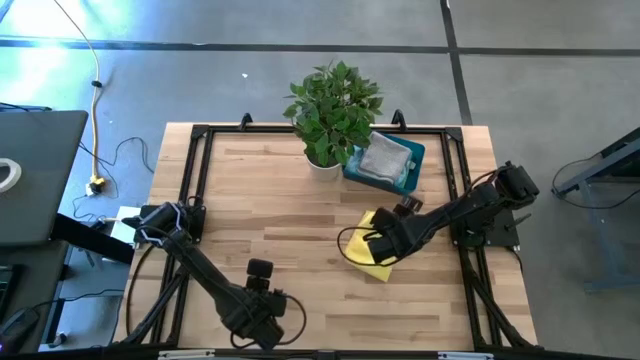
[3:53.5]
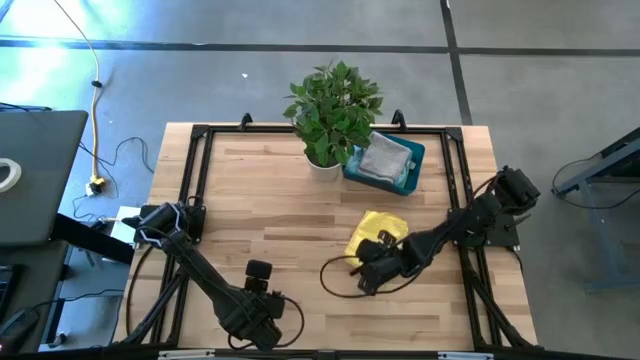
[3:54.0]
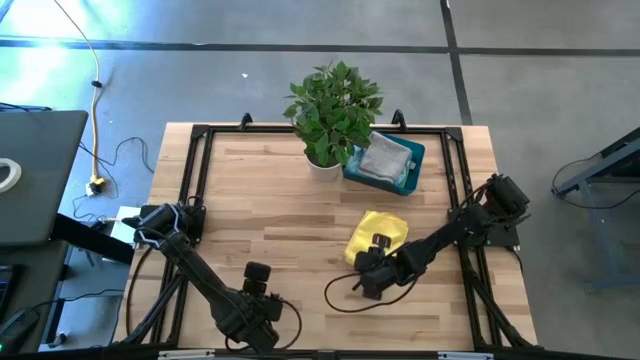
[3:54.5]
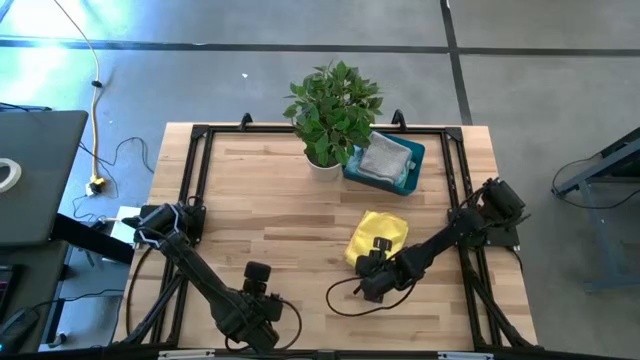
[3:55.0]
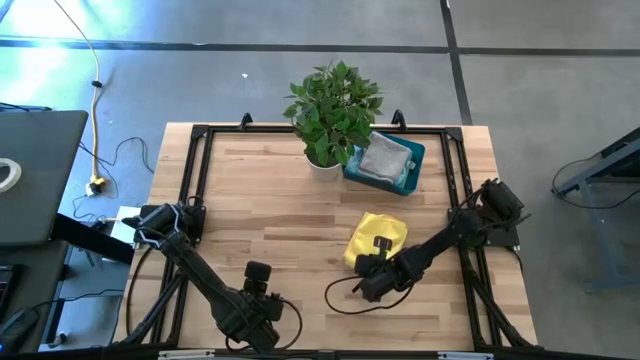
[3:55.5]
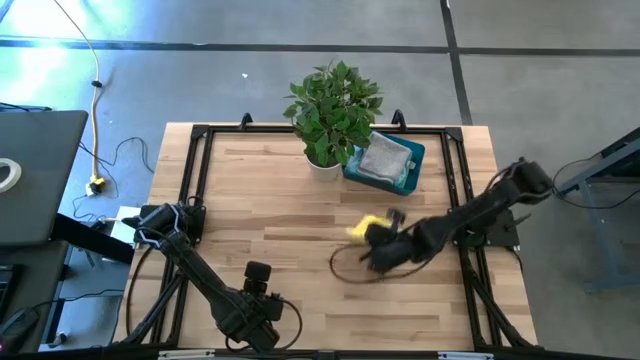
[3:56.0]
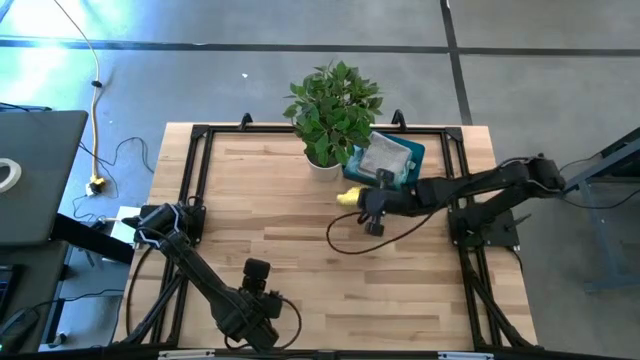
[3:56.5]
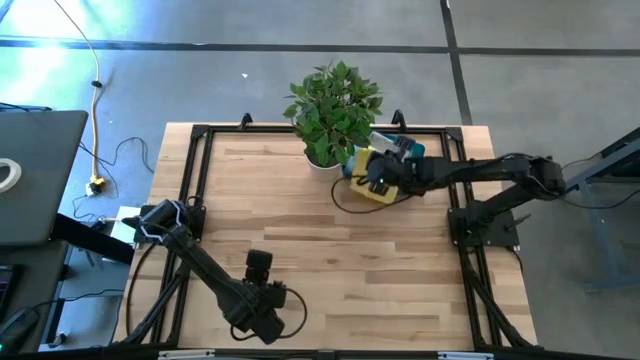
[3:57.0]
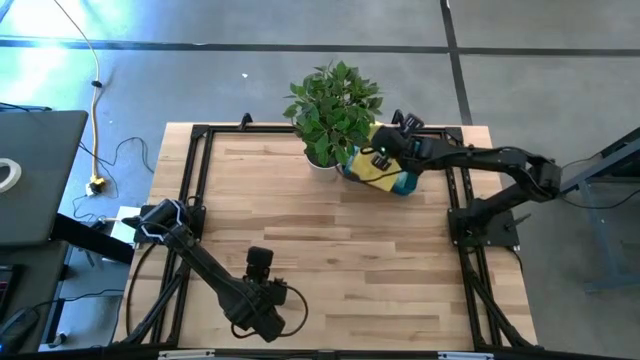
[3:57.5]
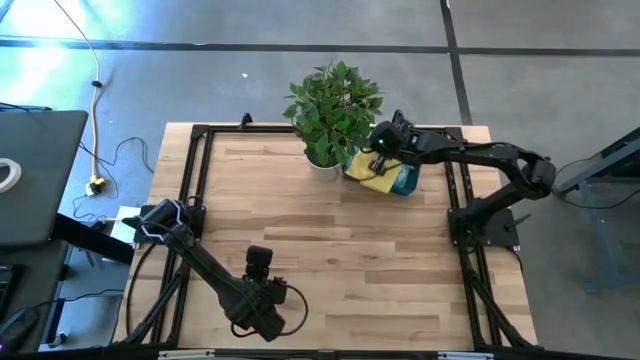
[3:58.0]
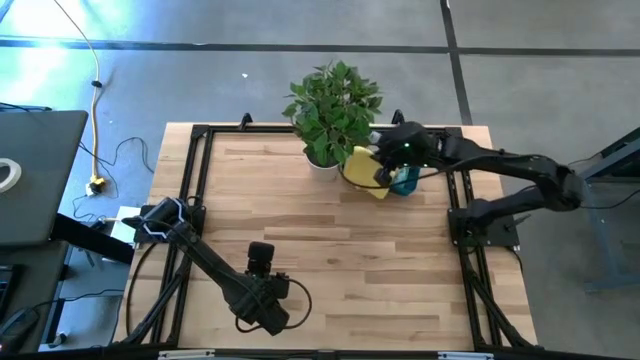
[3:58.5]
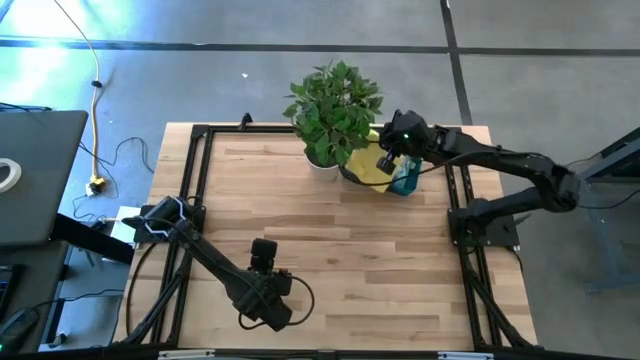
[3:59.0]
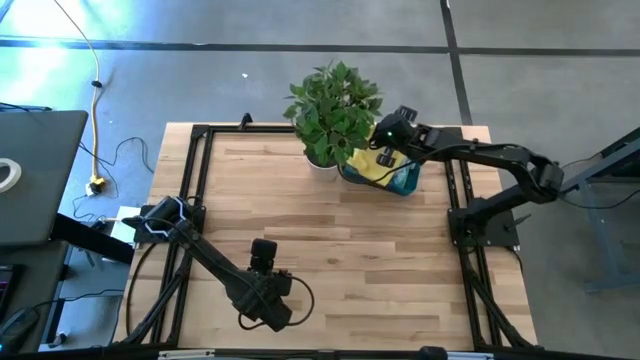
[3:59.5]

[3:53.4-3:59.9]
Task: Fold microfiber towels
Put the yellow towel into the blue bin

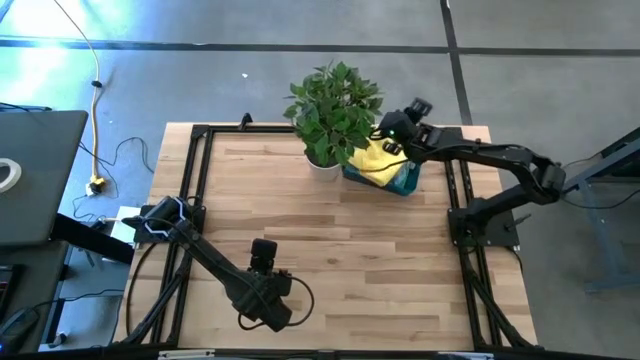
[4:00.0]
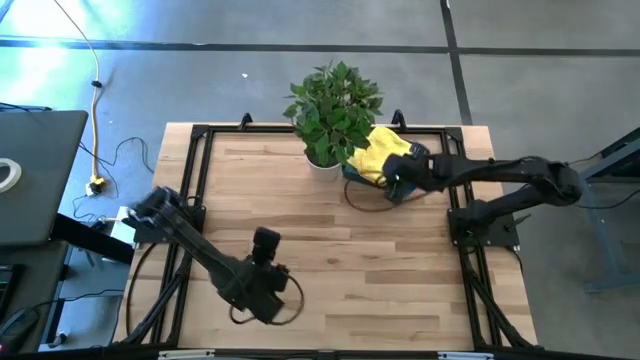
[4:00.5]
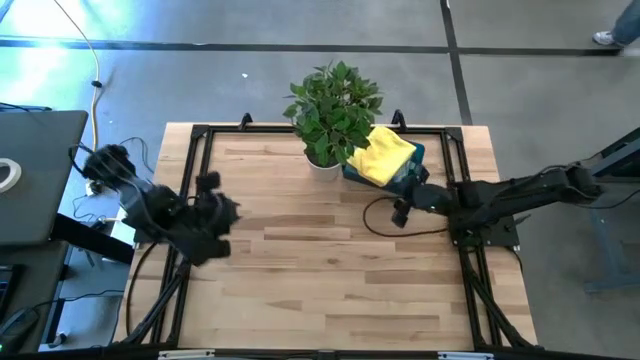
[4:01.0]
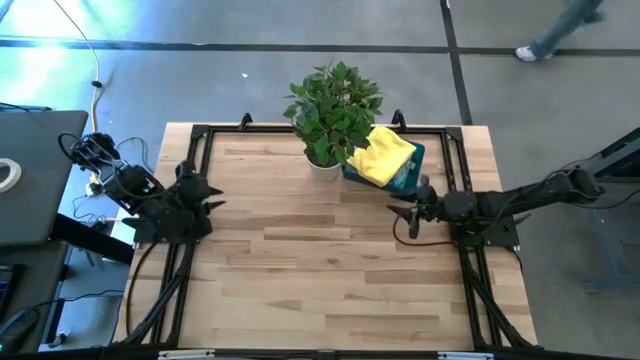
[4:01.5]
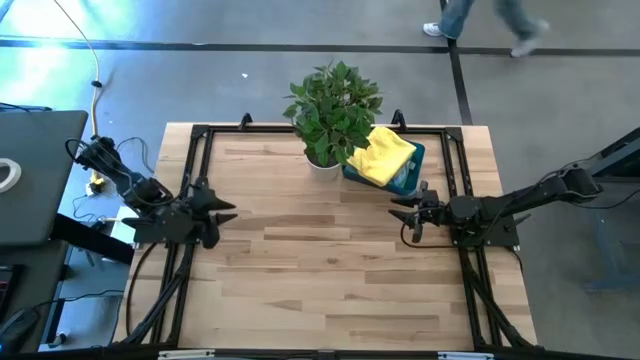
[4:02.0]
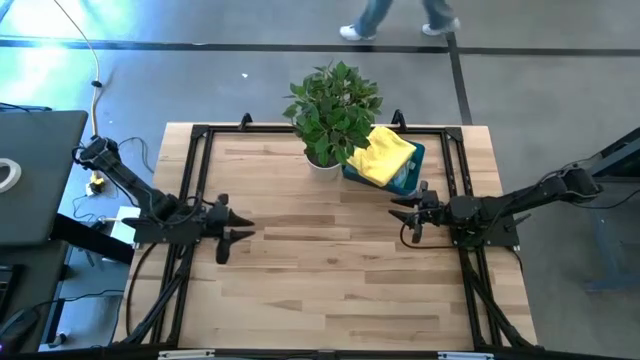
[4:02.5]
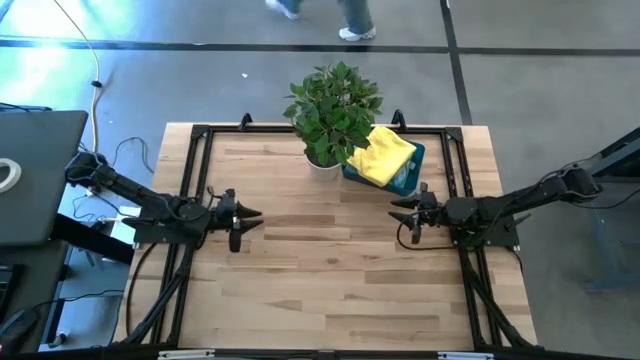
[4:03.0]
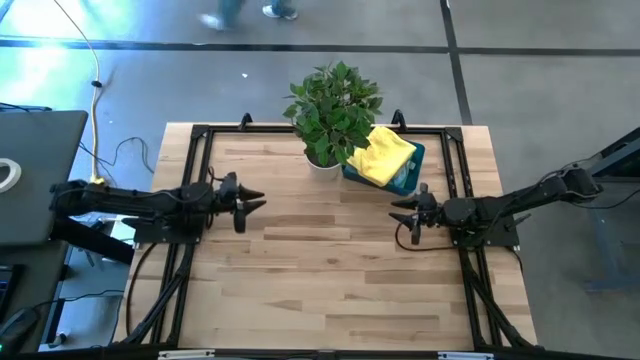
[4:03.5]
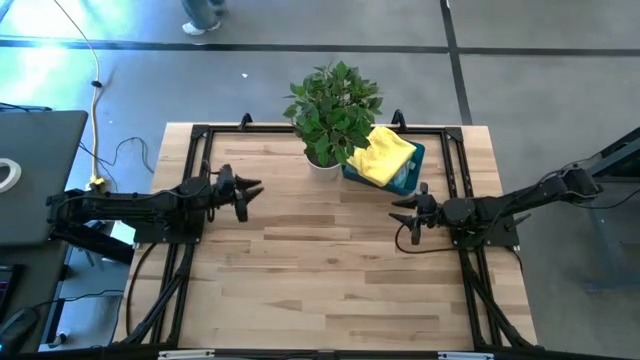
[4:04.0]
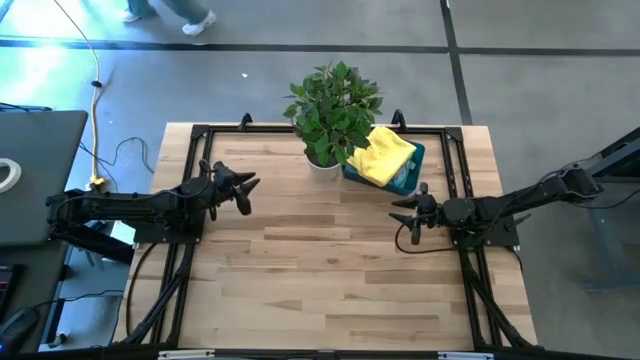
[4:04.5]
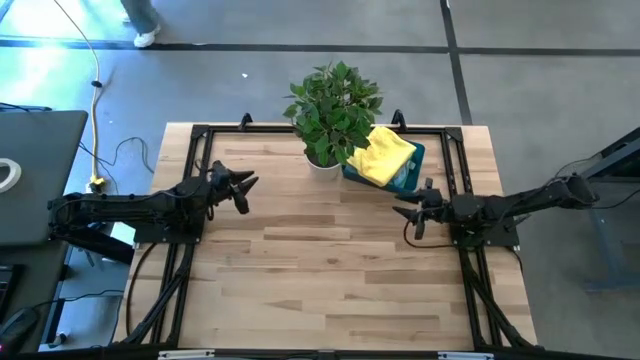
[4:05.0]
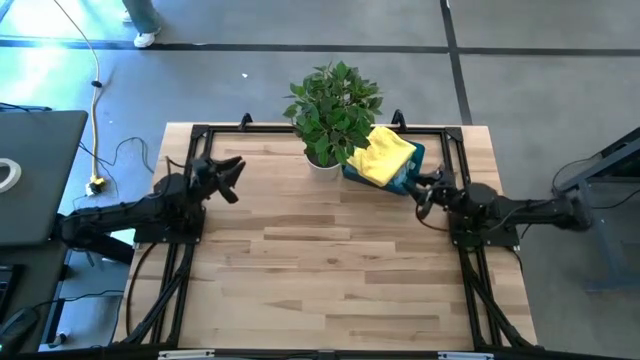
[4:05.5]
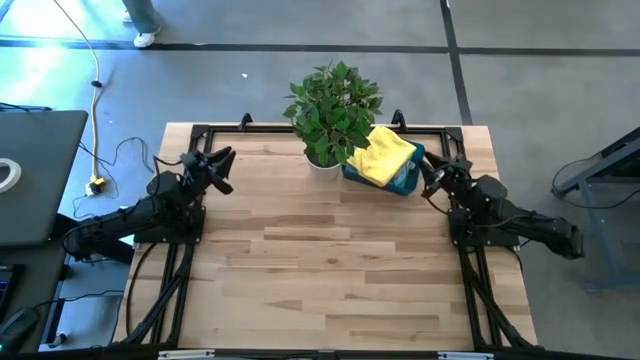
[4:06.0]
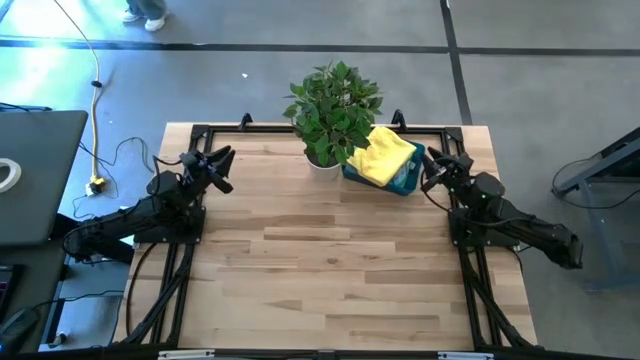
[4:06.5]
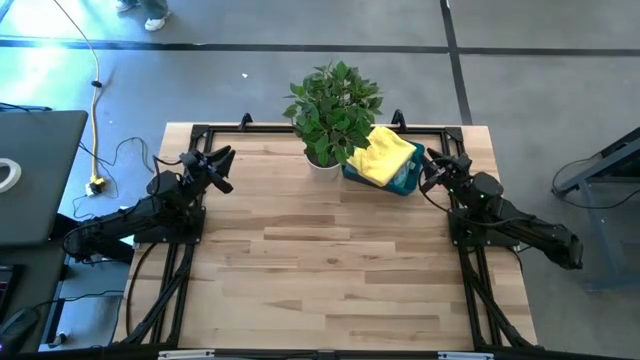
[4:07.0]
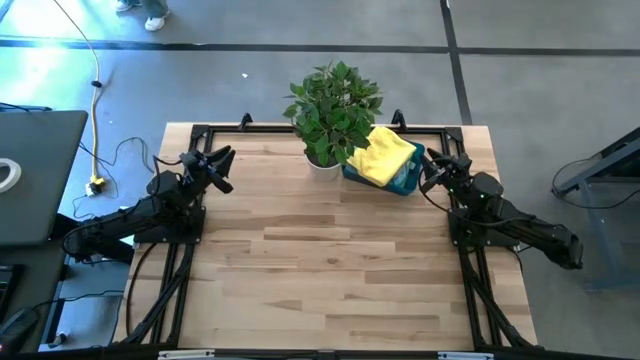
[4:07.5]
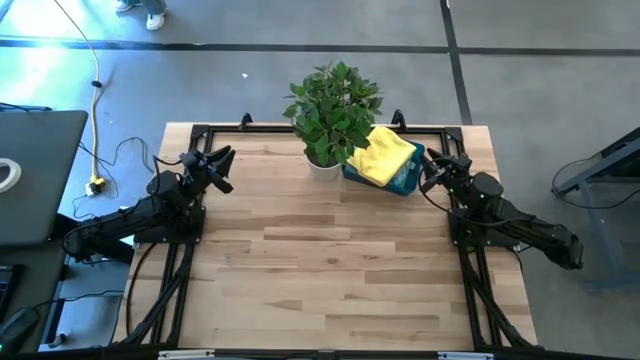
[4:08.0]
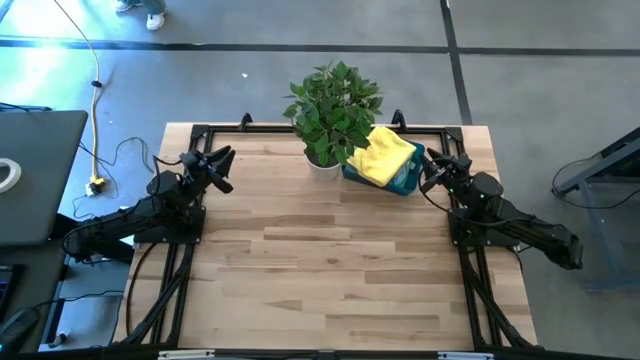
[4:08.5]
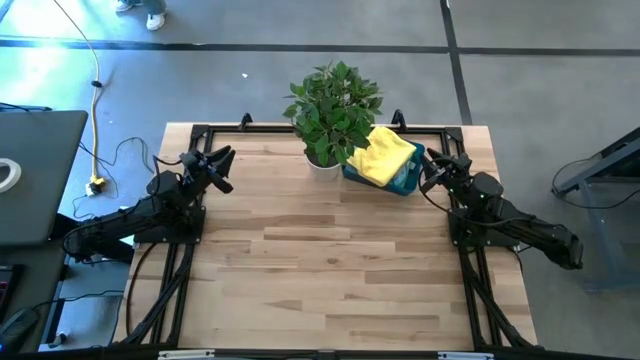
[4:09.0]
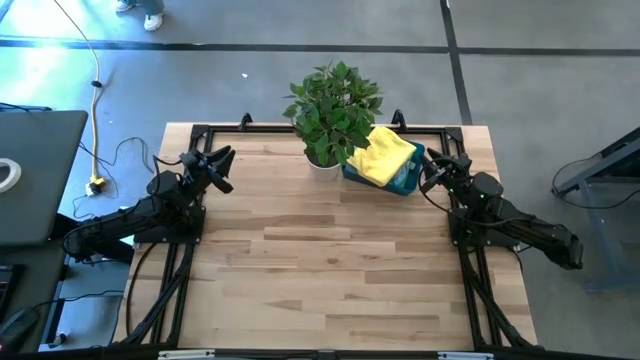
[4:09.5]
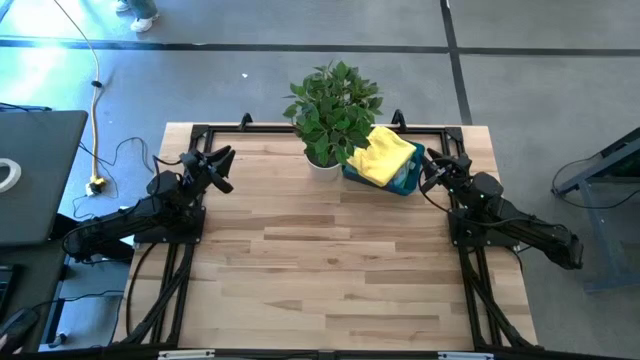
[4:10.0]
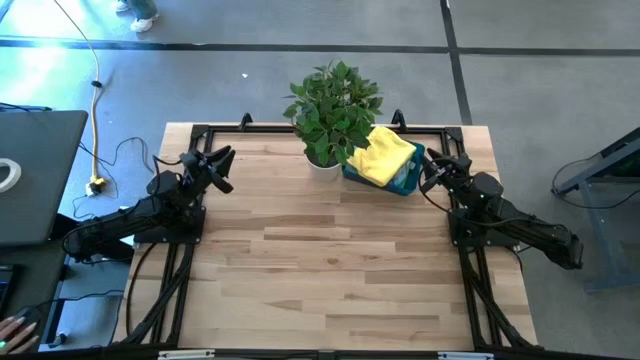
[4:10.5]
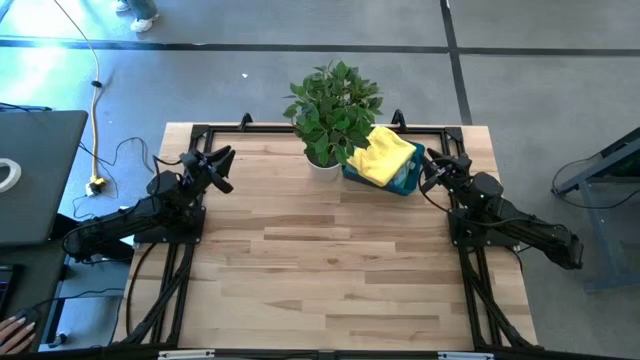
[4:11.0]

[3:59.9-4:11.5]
Return to Home Position

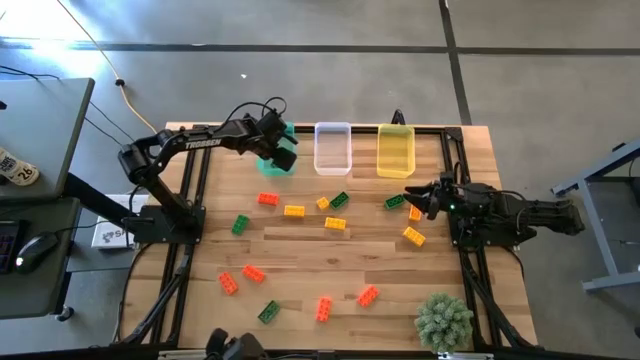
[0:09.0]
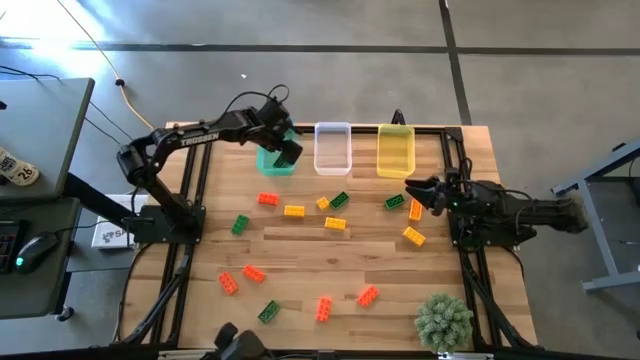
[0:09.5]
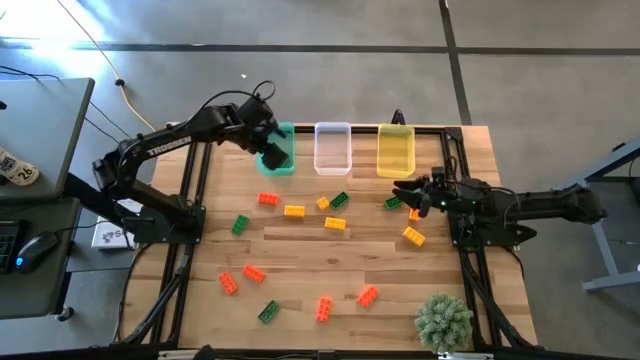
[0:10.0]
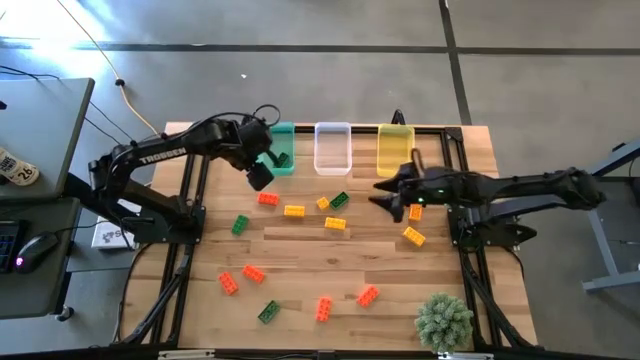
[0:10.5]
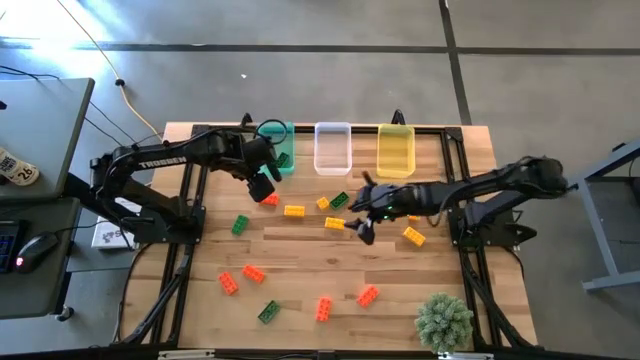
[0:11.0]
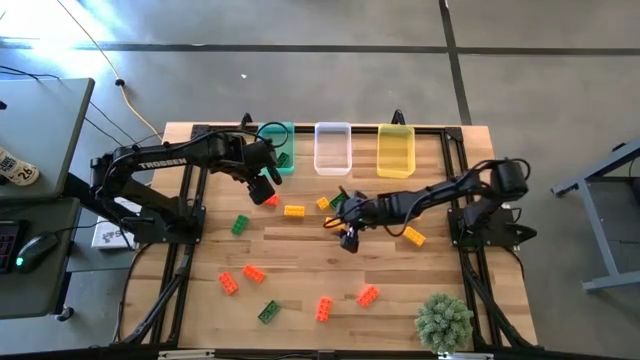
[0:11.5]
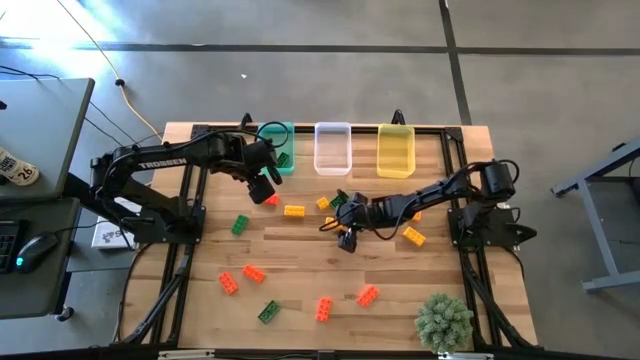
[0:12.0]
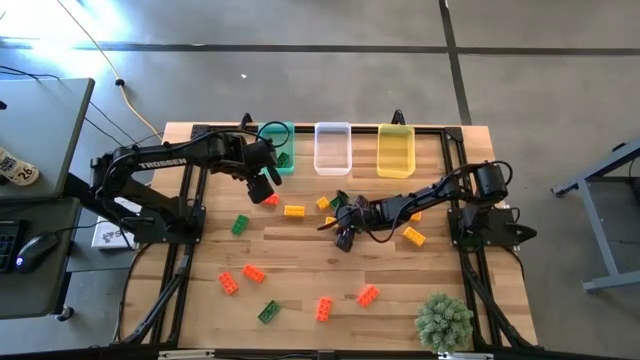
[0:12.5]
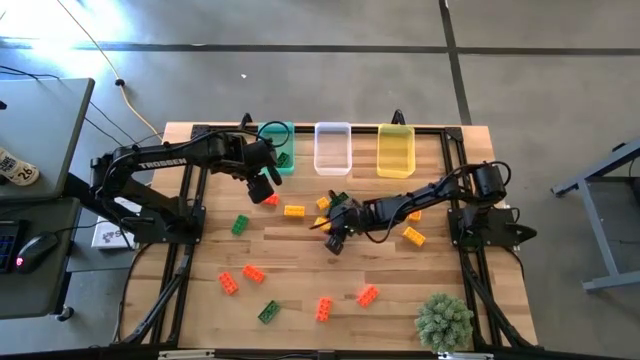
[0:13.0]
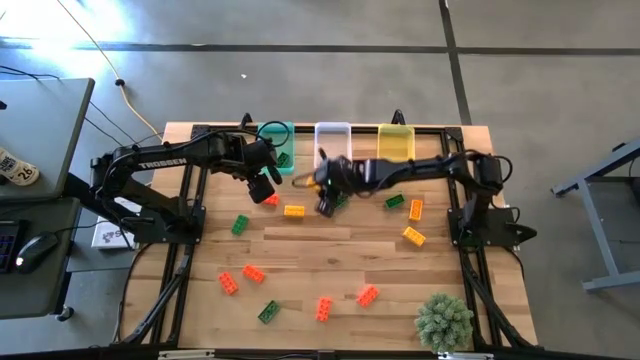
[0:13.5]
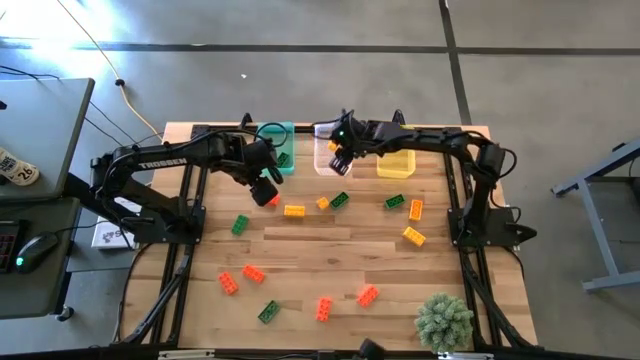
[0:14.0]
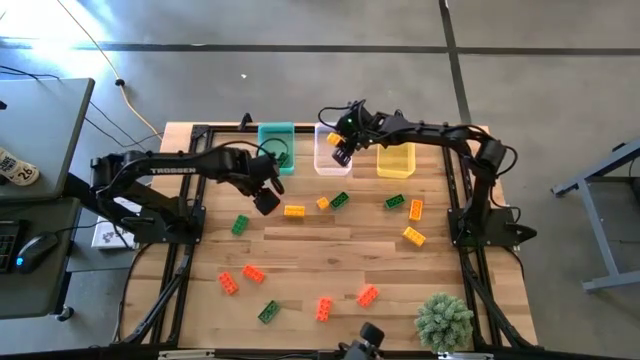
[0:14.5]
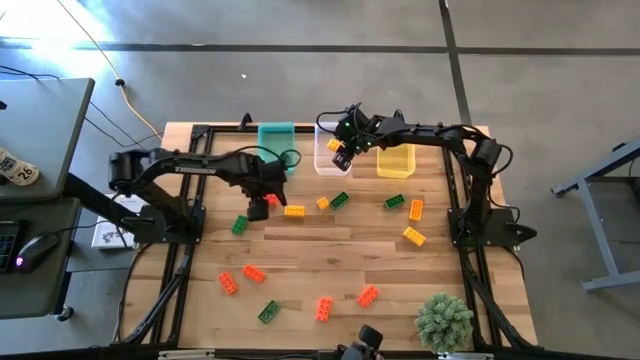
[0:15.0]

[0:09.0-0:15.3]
Task: Sort & place blocks by color
Put the yellow game piece into the white bin
